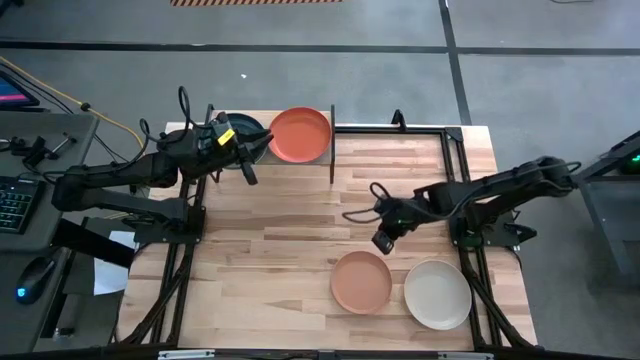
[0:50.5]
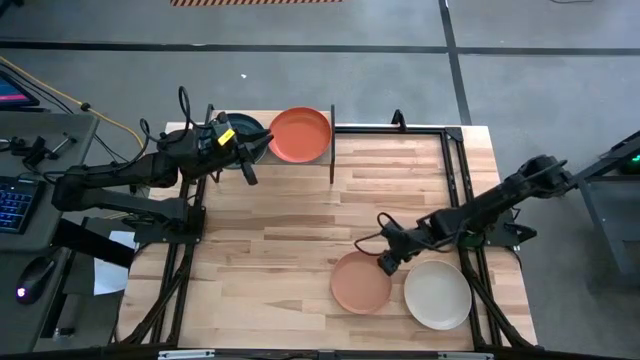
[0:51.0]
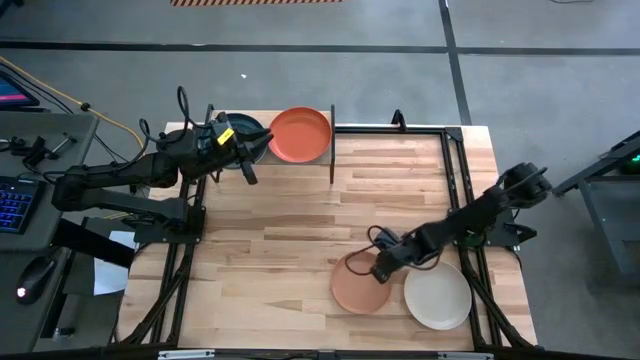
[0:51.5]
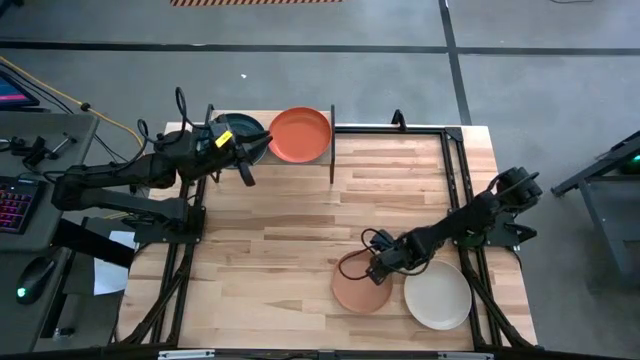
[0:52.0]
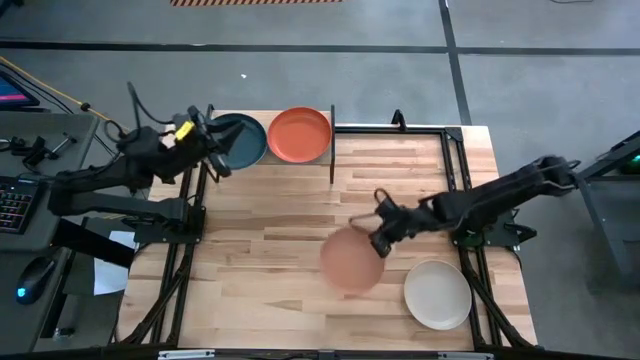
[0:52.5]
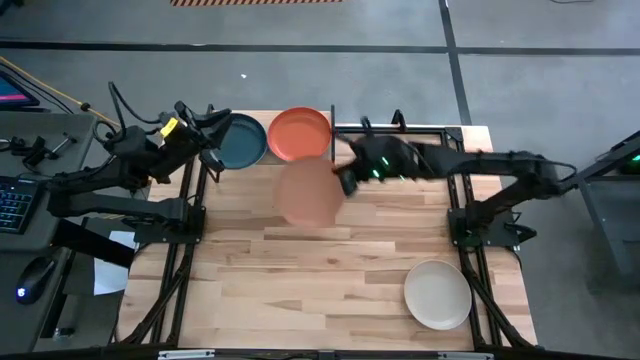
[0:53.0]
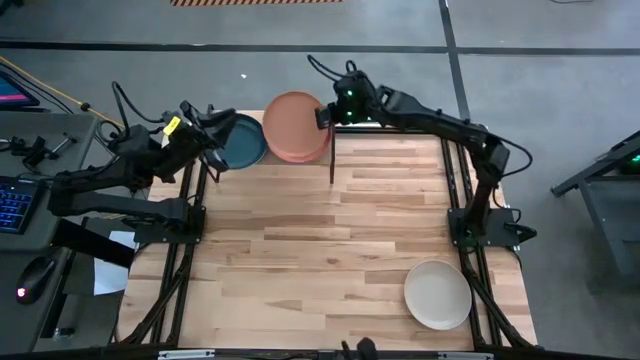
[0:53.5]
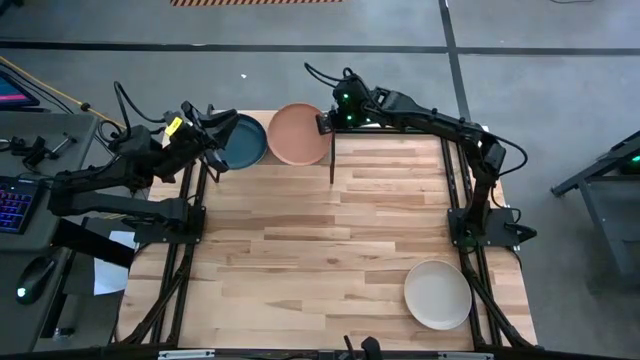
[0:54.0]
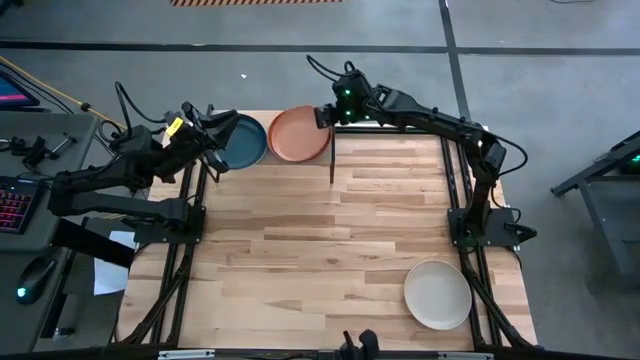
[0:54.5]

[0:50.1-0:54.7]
Task: Place and stack plates onto a shelf
Stack the light orange plate on top of the orange plate on the shelf

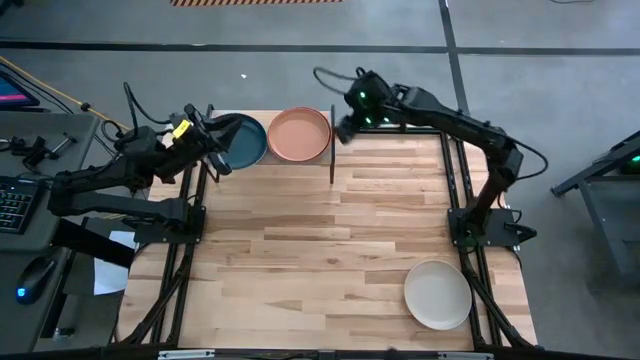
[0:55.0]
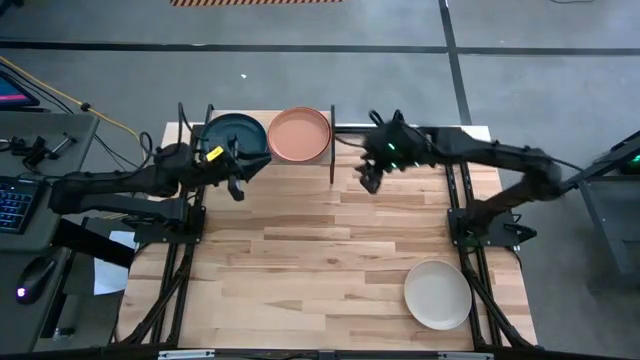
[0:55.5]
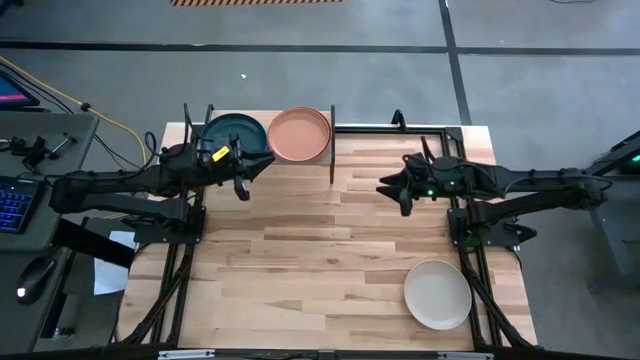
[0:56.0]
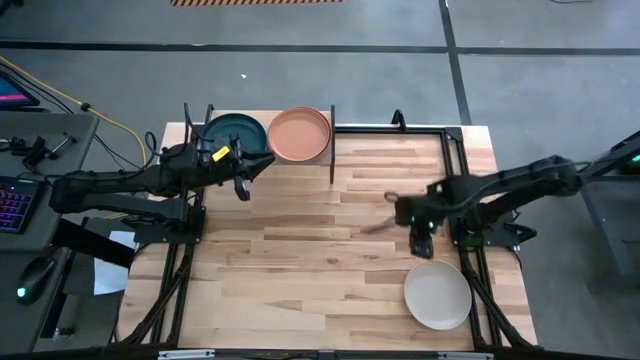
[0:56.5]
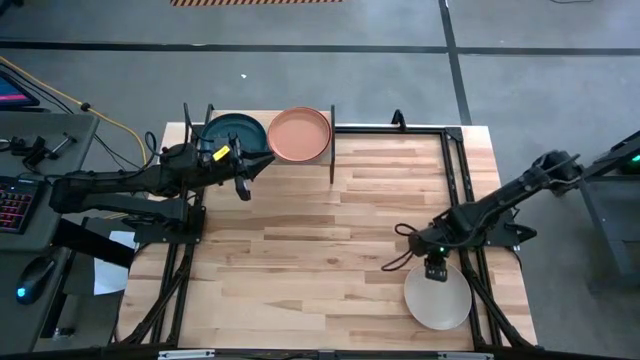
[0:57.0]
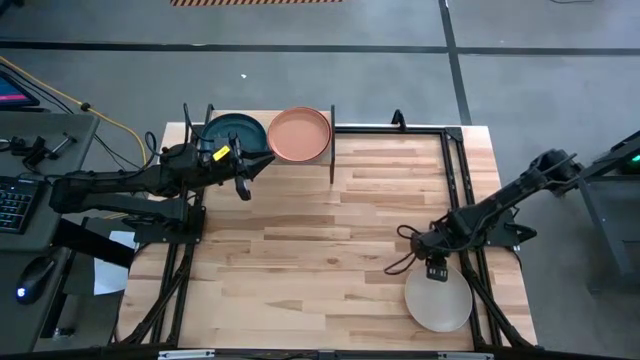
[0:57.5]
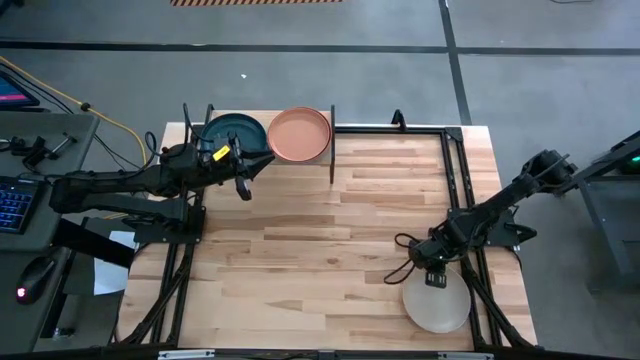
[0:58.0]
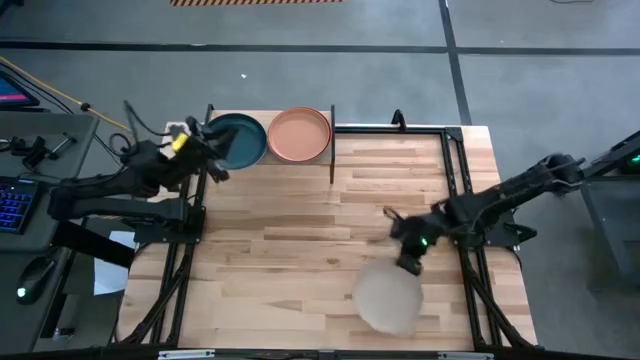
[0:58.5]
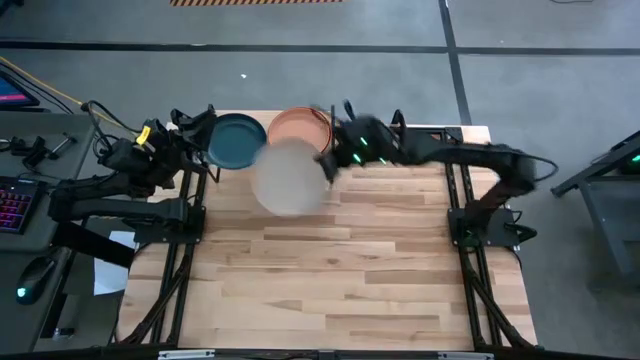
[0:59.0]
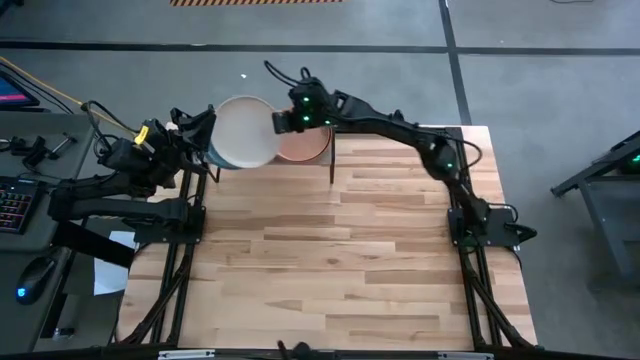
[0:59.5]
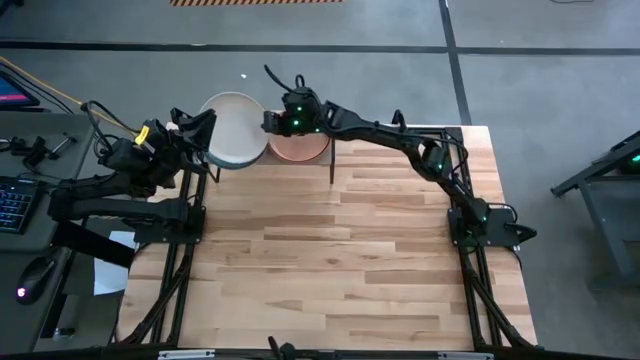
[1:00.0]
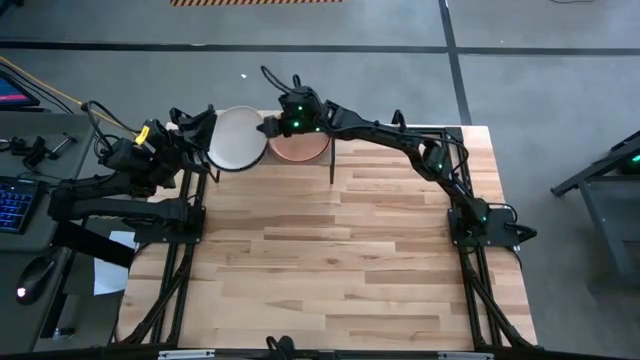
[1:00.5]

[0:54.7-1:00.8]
Stack the white plate on top of the dark blue plate on the shelf

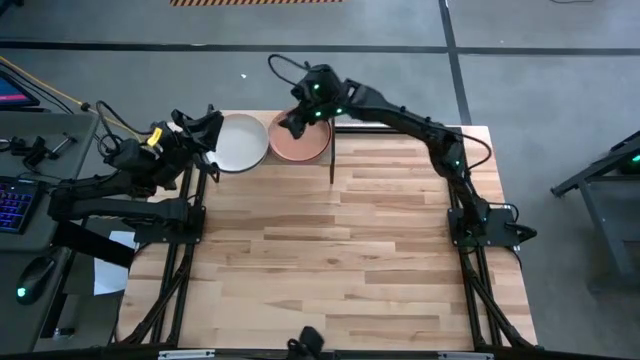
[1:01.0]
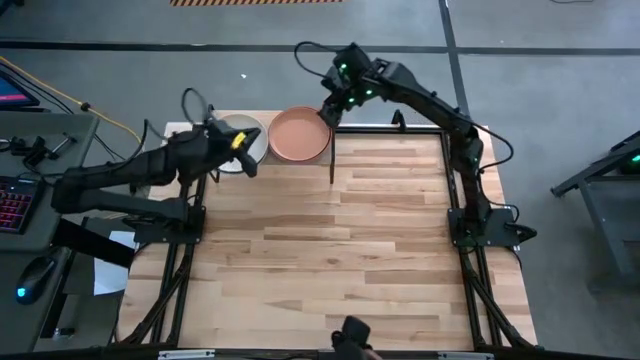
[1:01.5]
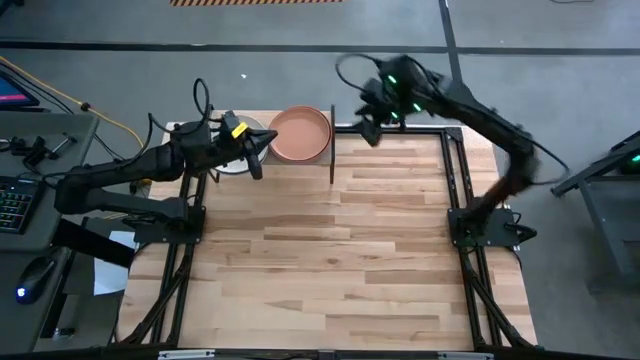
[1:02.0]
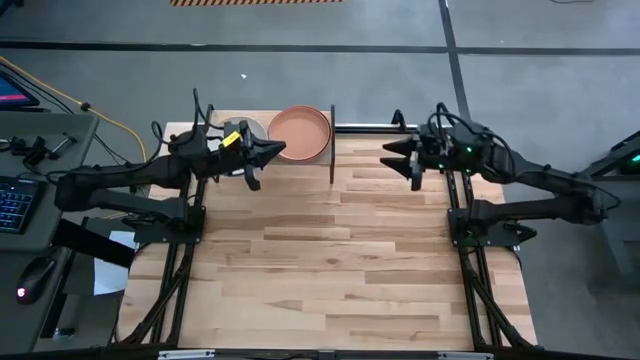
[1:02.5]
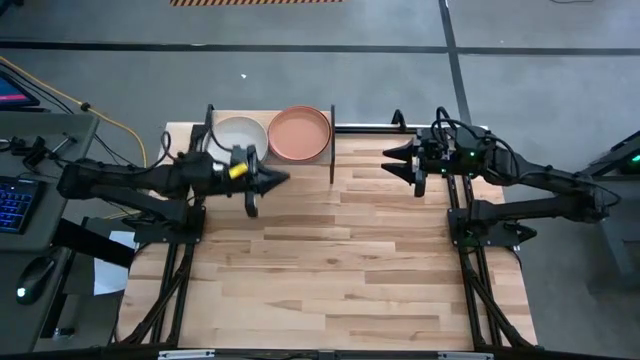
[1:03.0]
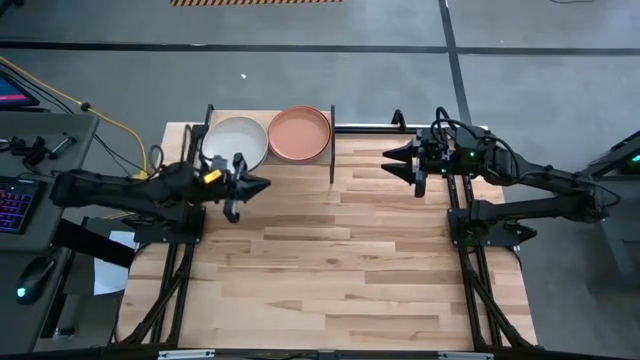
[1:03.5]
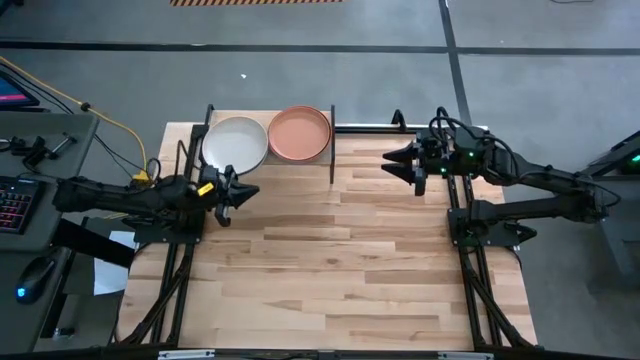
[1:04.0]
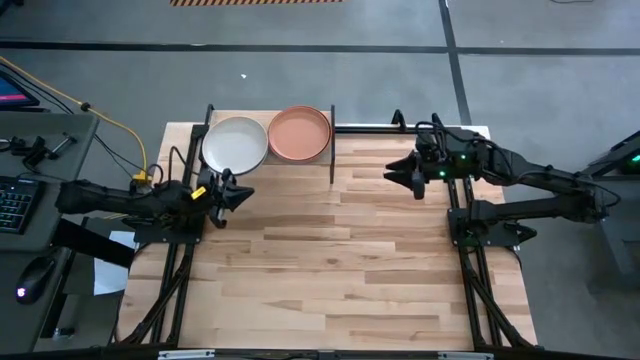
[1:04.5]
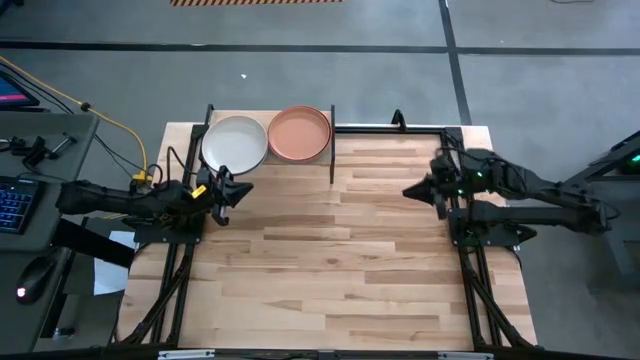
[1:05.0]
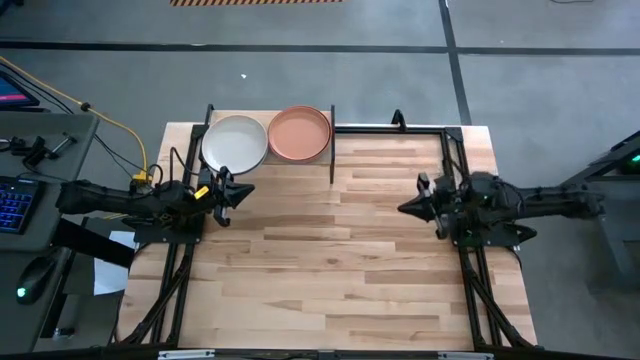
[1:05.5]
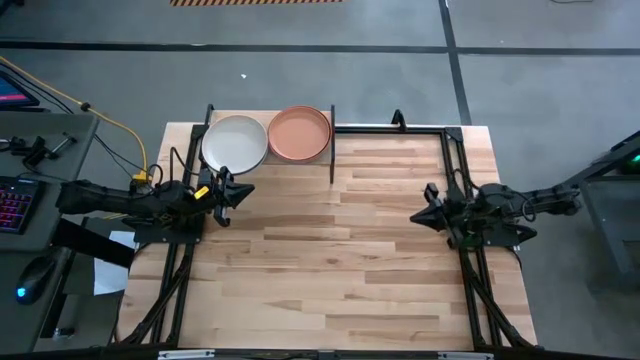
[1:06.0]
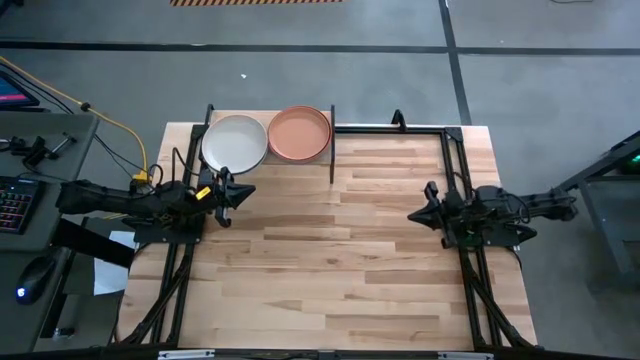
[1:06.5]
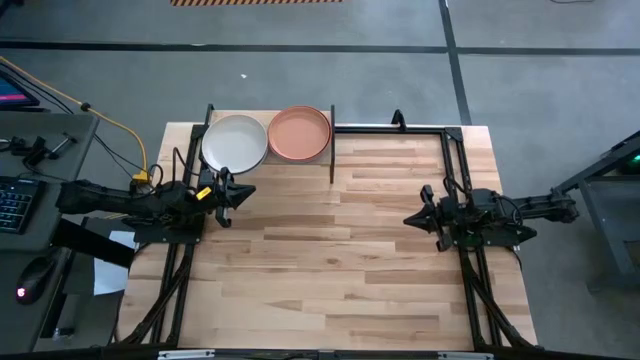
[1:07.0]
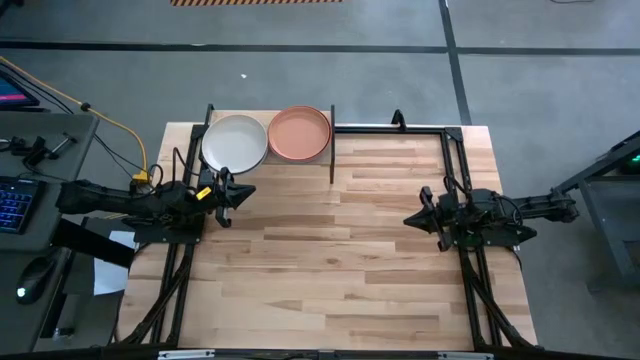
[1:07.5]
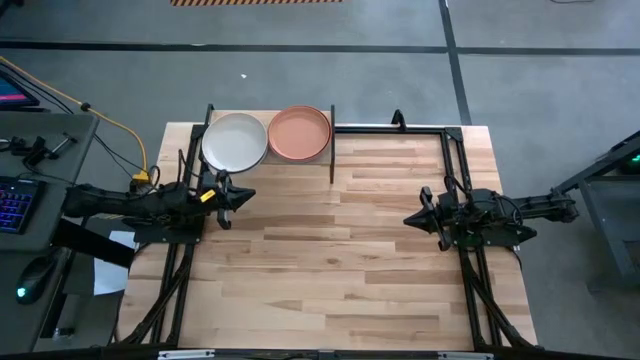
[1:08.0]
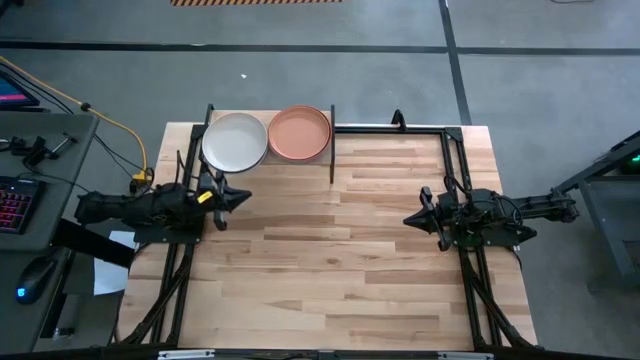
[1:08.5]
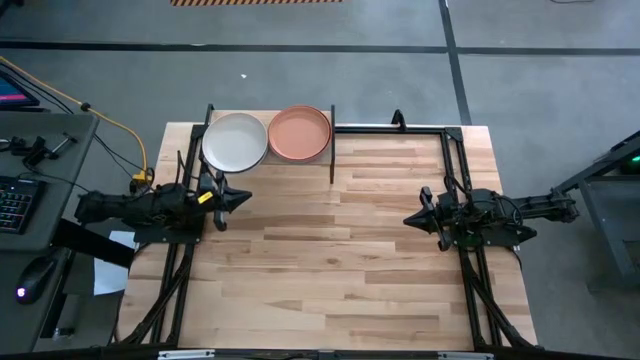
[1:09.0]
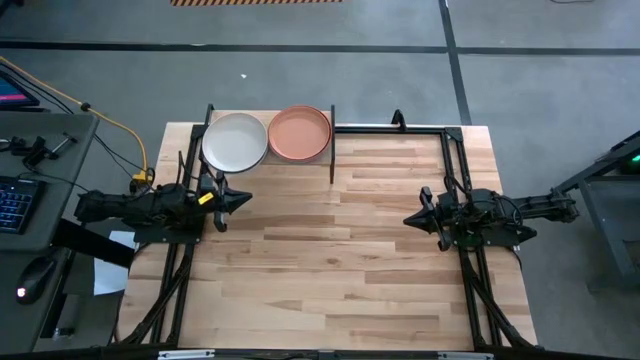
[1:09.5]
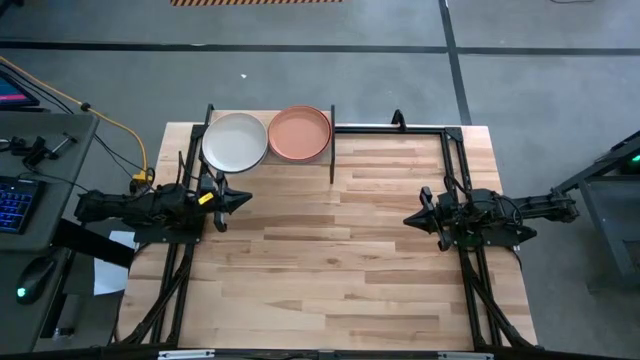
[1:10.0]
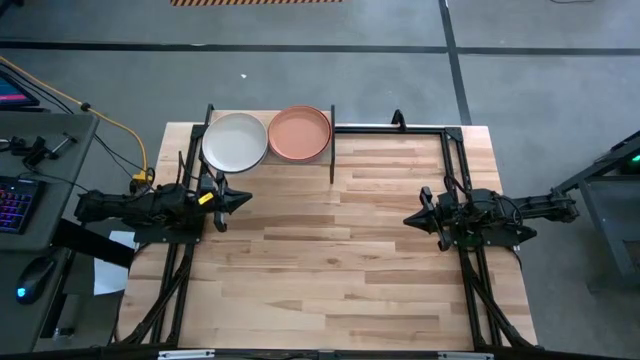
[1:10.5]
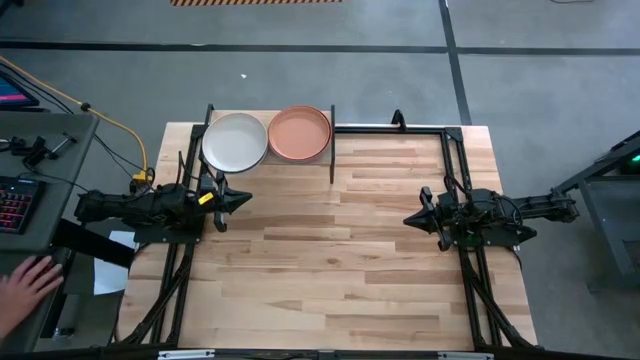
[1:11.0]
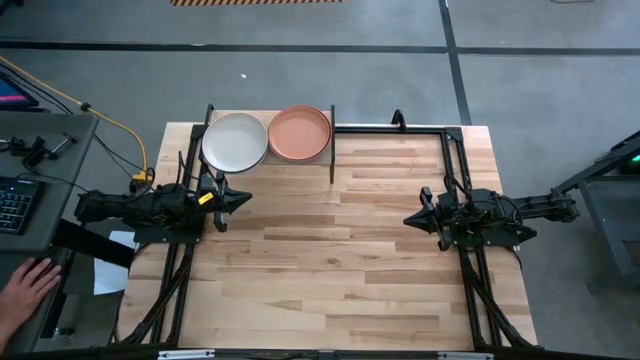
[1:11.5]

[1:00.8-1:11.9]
Return to Home Position
